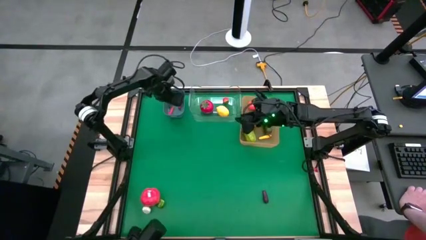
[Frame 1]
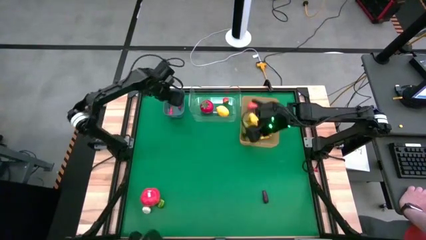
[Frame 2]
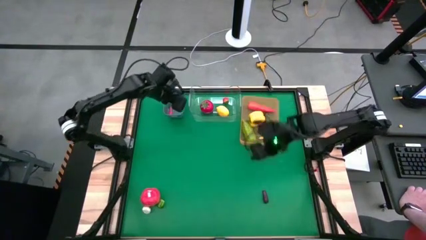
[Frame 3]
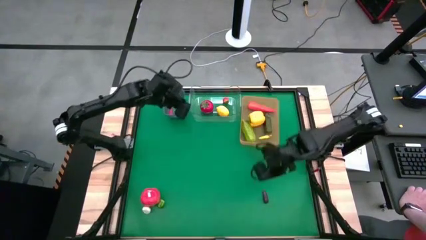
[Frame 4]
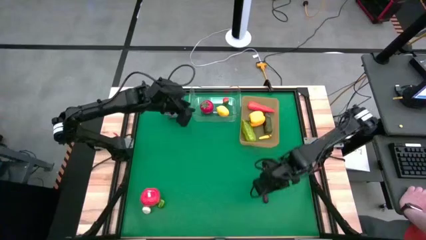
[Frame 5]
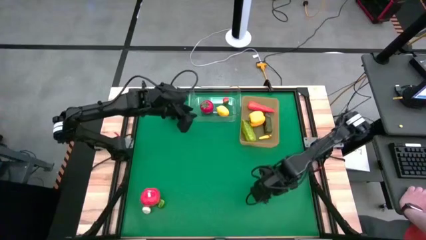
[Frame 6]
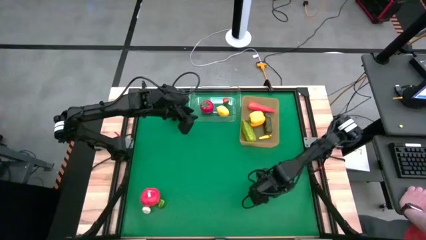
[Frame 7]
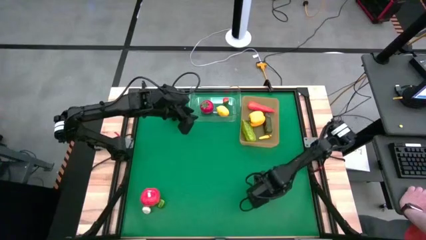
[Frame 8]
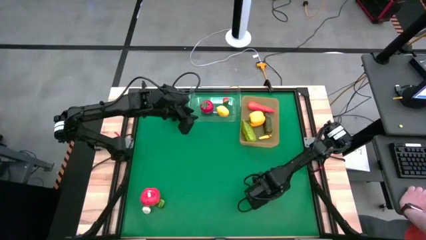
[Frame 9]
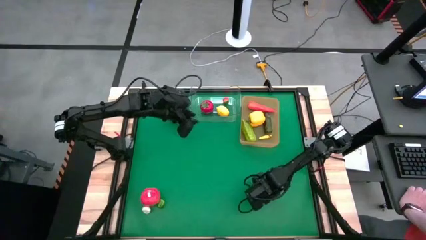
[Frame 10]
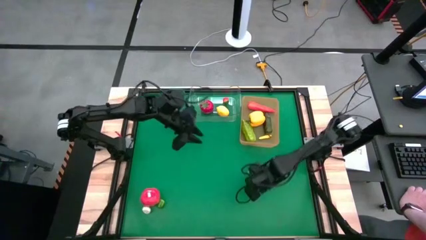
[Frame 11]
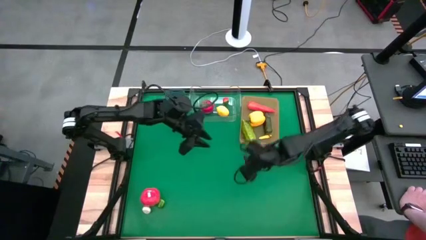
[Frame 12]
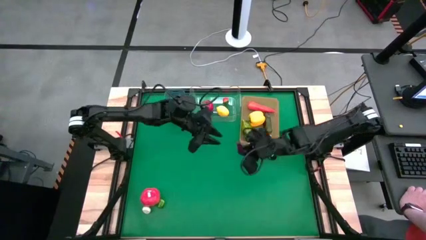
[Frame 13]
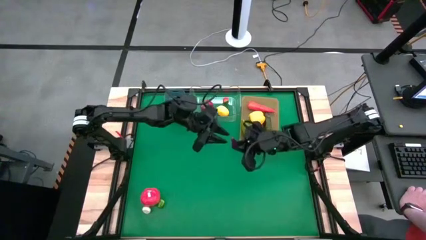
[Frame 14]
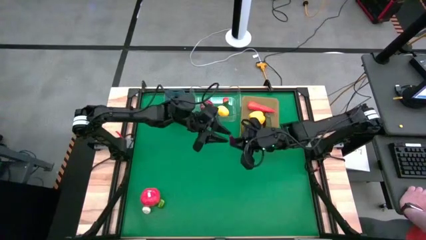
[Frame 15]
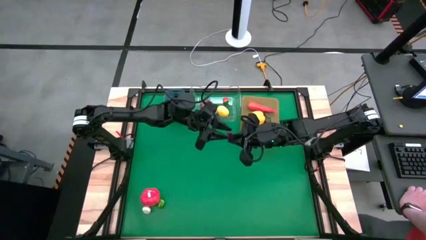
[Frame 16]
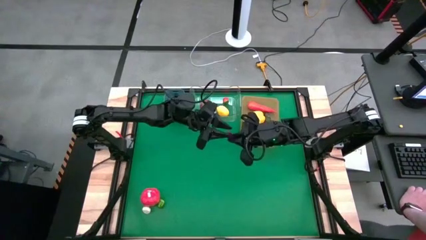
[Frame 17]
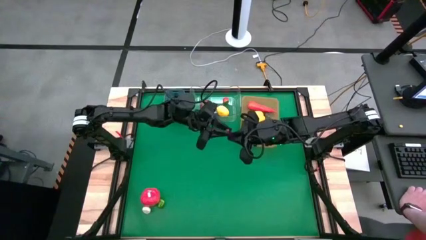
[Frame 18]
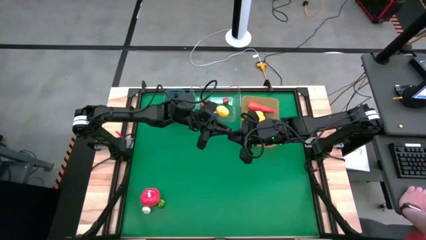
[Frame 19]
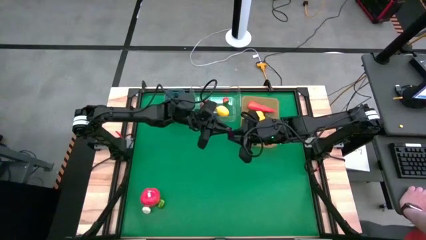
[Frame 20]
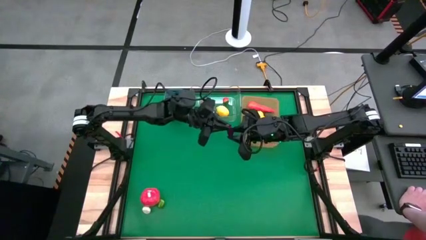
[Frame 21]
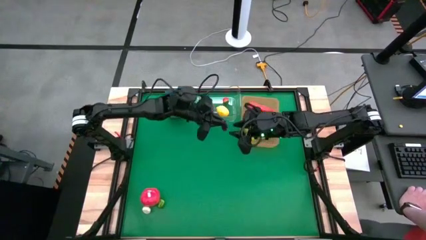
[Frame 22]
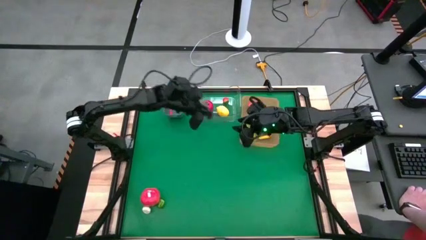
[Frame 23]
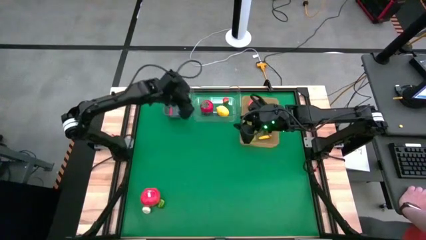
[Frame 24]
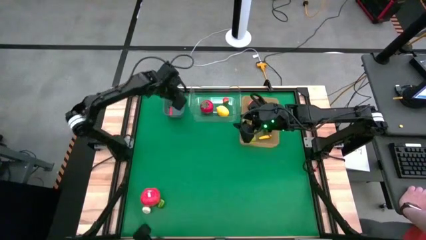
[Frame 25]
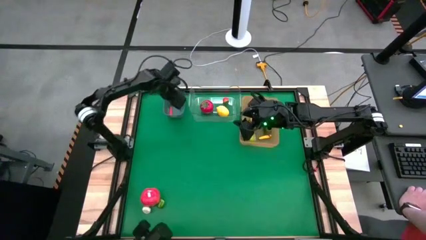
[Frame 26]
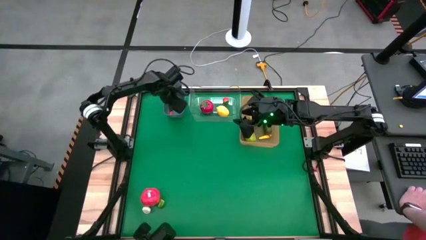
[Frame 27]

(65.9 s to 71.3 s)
Task: Sort produce into baskets
Put the eggplant into the blue bin

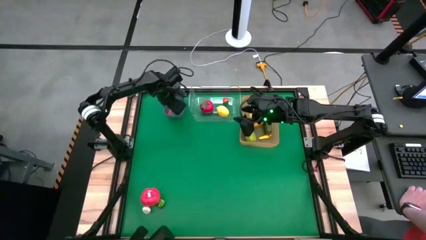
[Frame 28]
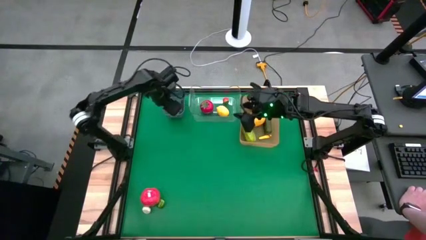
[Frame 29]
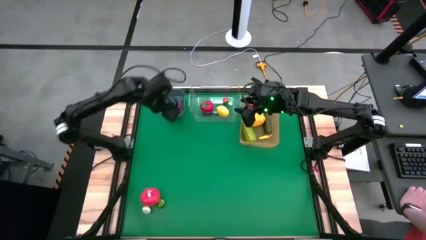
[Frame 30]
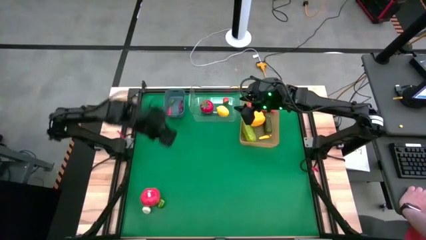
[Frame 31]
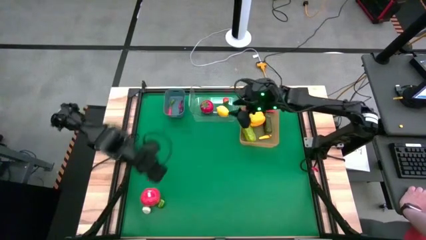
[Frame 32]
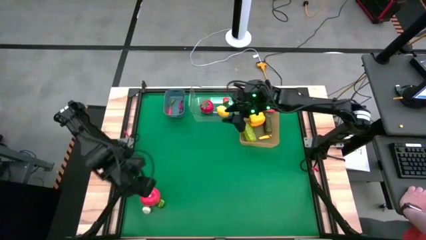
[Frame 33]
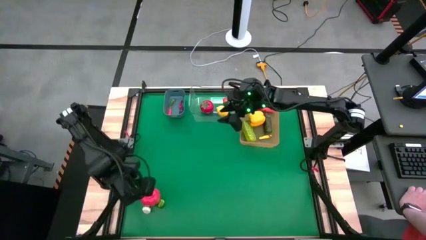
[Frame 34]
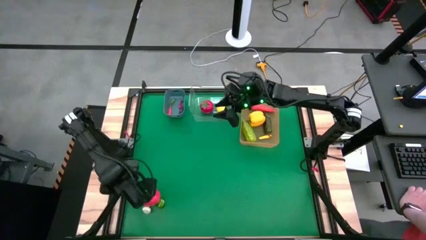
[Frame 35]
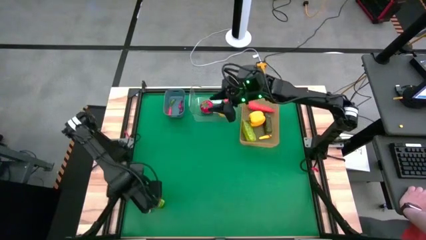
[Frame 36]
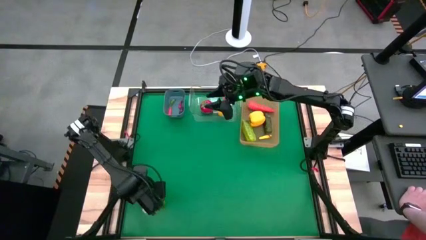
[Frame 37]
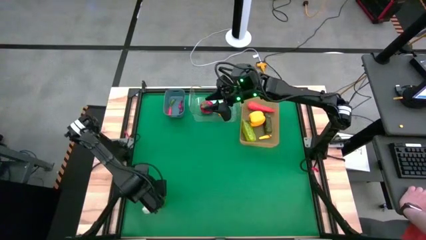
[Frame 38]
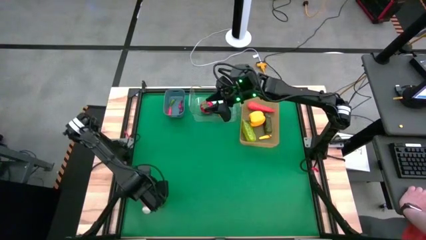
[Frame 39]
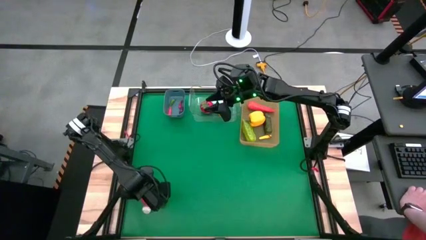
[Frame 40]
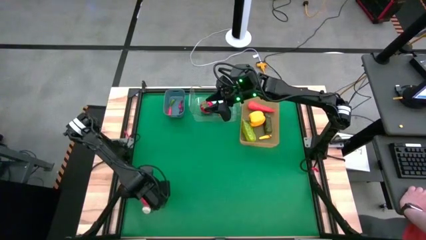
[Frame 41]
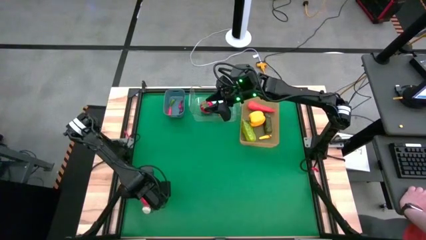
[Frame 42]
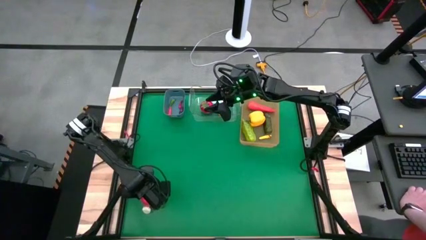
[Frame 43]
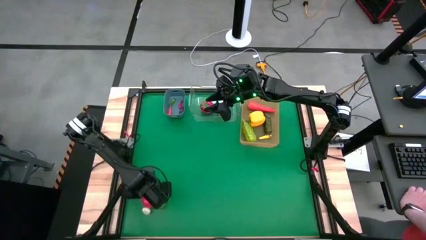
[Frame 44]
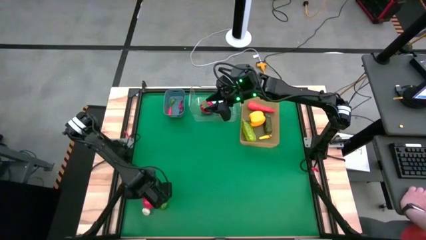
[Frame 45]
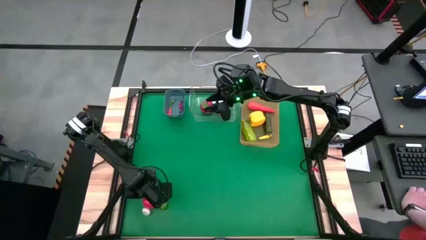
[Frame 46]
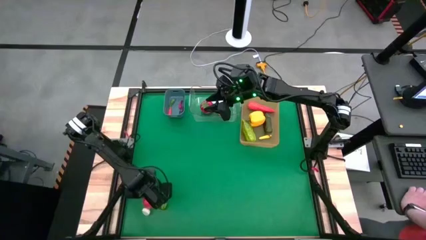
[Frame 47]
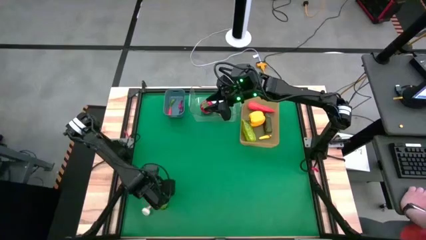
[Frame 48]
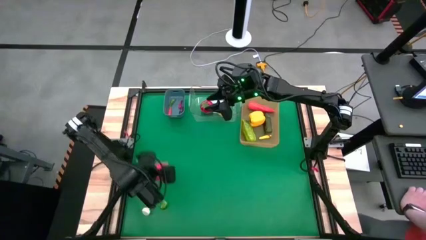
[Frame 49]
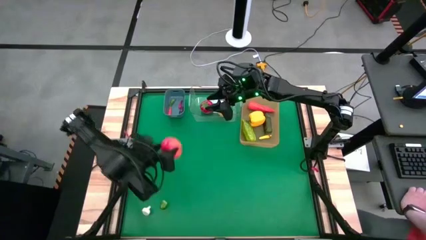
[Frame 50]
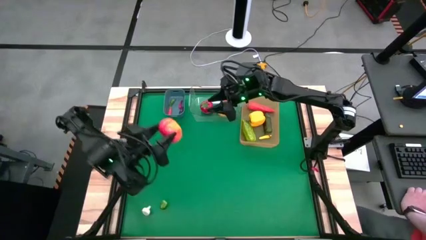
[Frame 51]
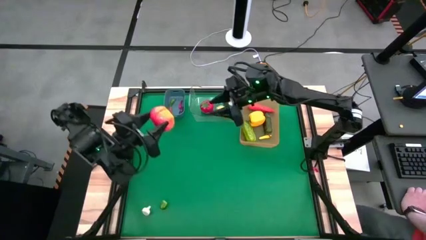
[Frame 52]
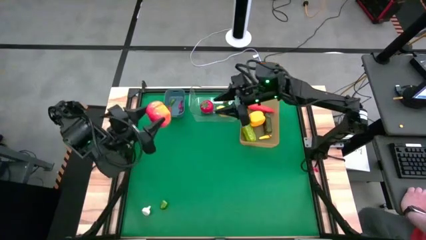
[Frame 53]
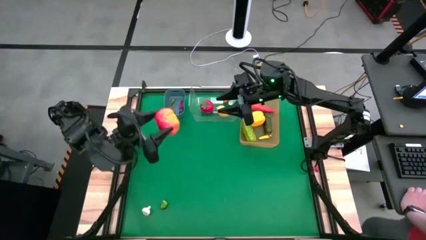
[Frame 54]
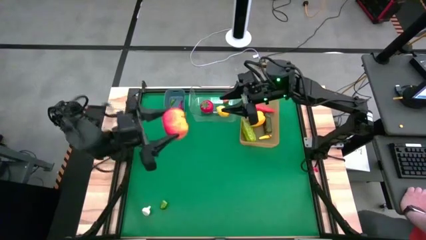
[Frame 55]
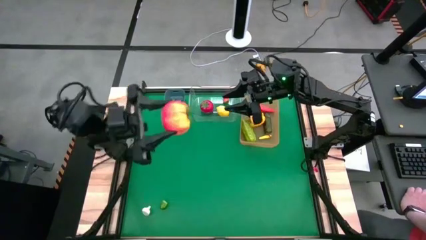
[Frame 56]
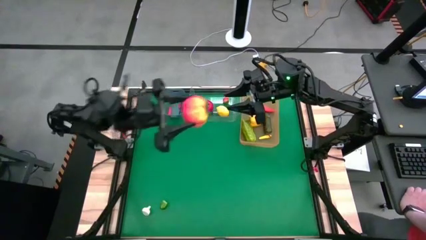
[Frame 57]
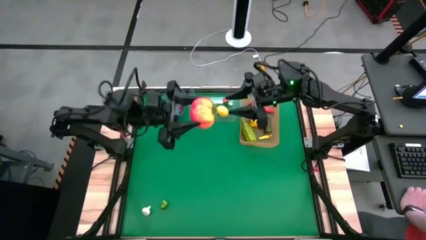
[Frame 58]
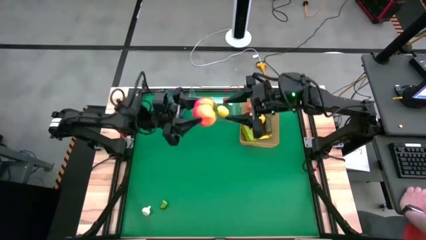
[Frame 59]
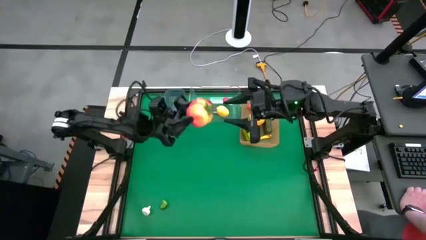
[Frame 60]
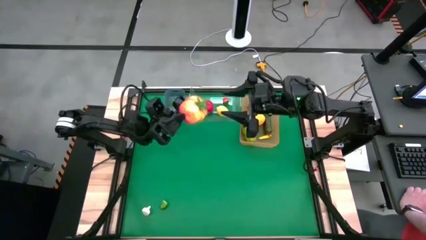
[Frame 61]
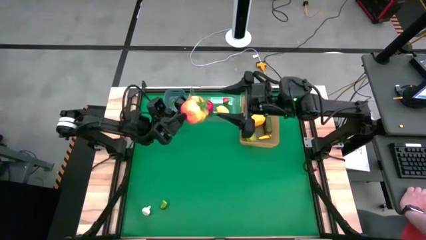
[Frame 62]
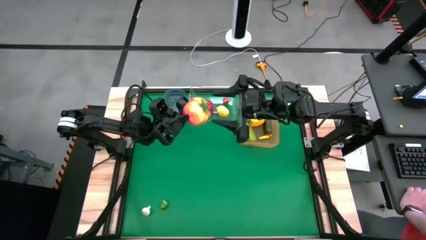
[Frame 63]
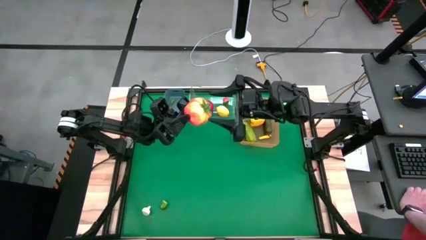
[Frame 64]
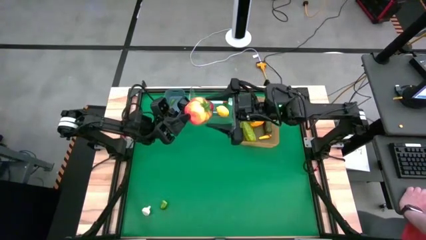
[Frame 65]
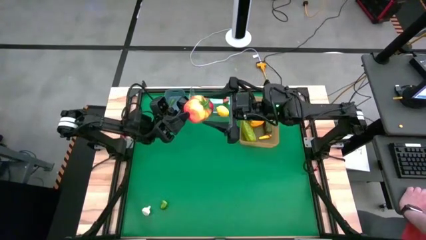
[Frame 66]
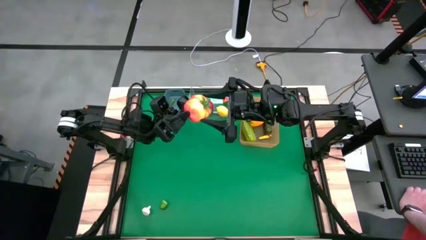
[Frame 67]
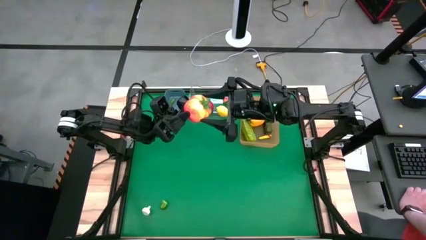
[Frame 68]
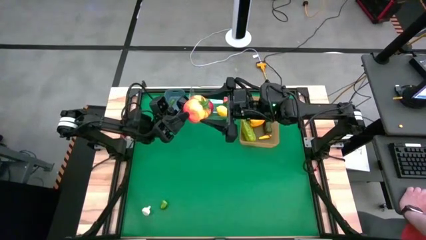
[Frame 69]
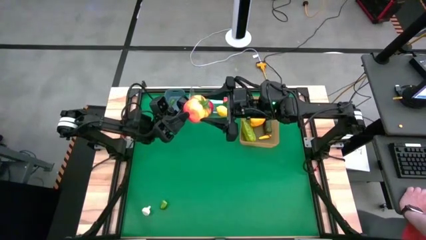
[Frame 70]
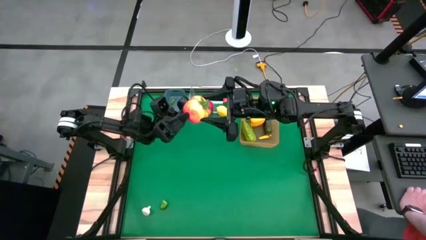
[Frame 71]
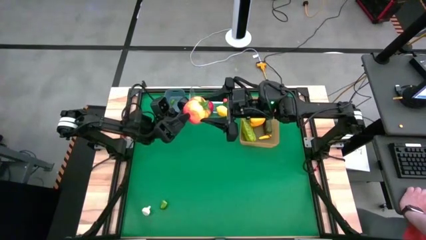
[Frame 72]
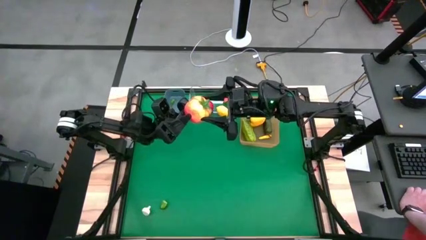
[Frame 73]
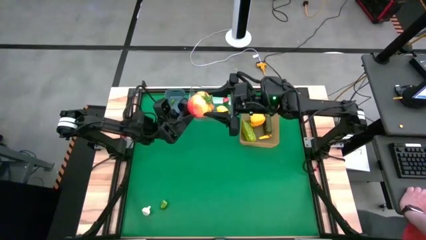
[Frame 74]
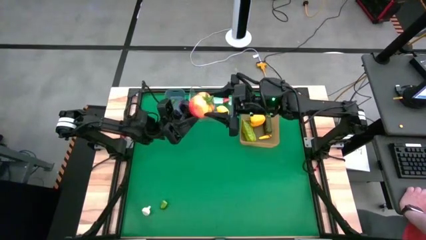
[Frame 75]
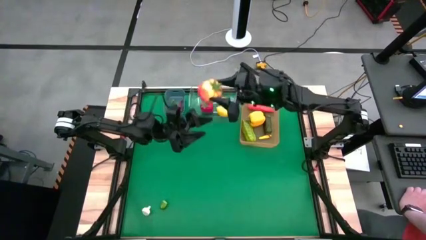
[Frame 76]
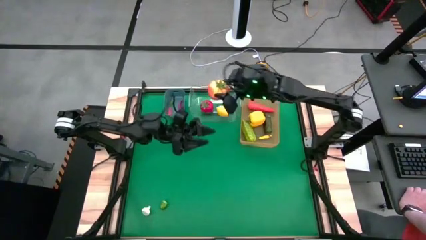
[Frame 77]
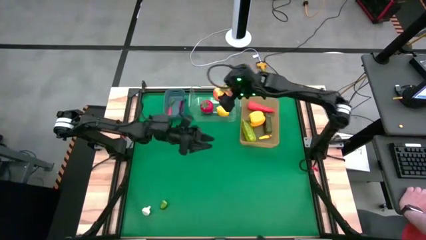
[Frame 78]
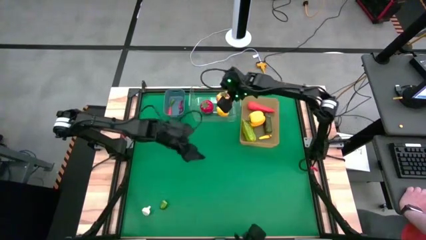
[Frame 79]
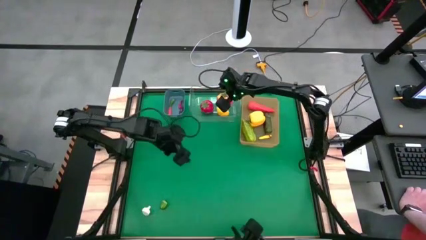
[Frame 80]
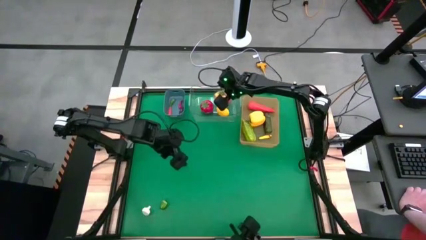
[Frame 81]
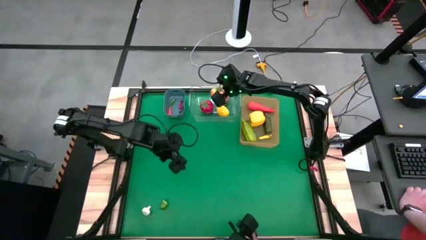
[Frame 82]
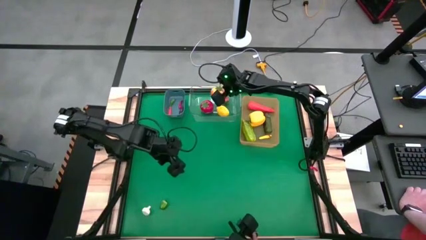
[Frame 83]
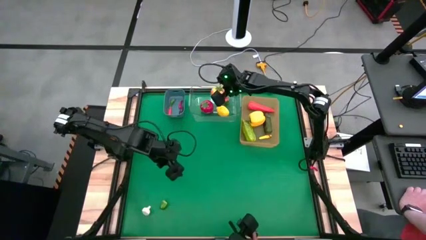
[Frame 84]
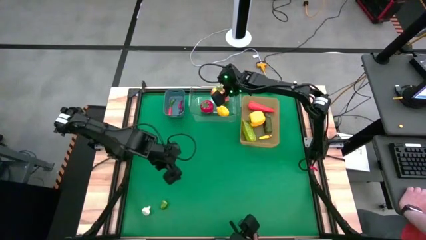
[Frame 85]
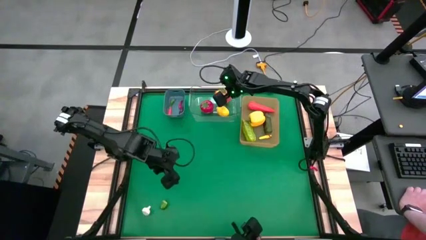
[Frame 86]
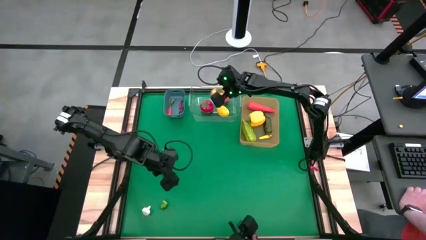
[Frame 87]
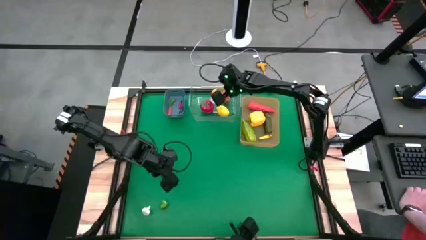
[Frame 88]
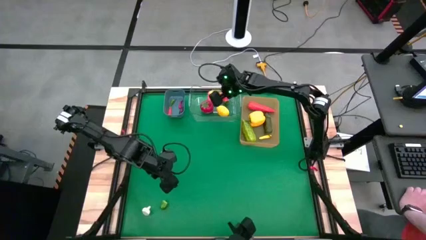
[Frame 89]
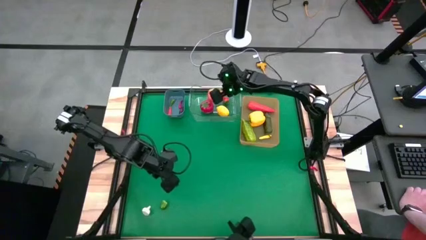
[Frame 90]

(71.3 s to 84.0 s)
Put the orange tomato into the transparent bin
